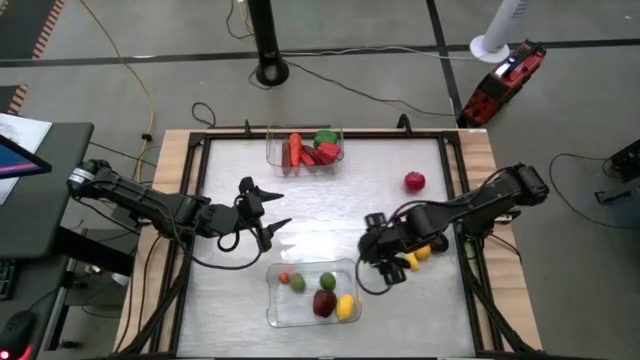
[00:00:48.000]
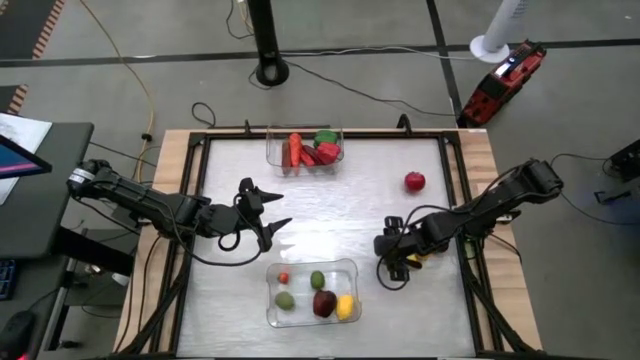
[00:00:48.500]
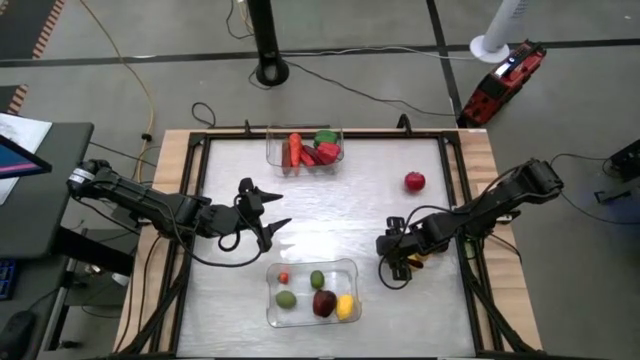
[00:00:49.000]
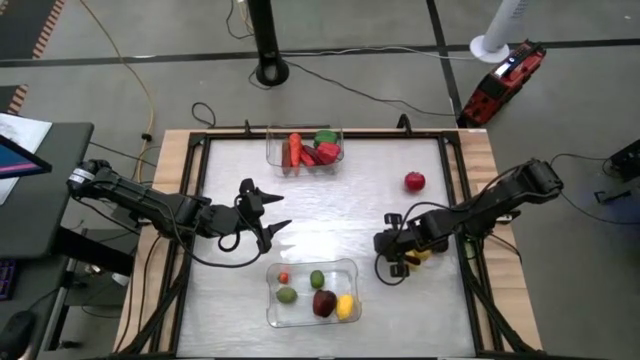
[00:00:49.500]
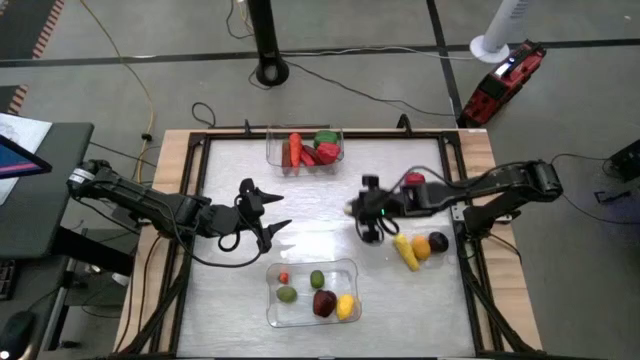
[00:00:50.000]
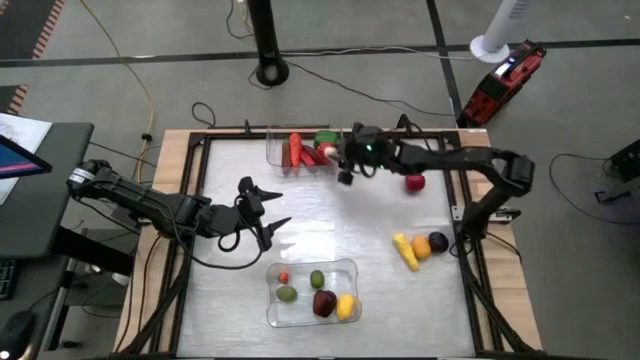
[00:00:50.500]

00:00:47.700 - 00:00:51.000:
Task: Sort produce into baskets
Put the garlic into the top transparent bin

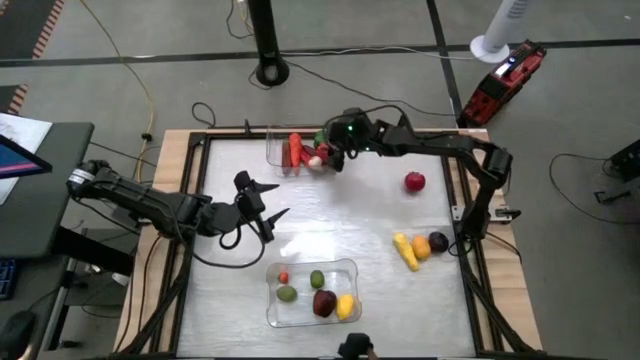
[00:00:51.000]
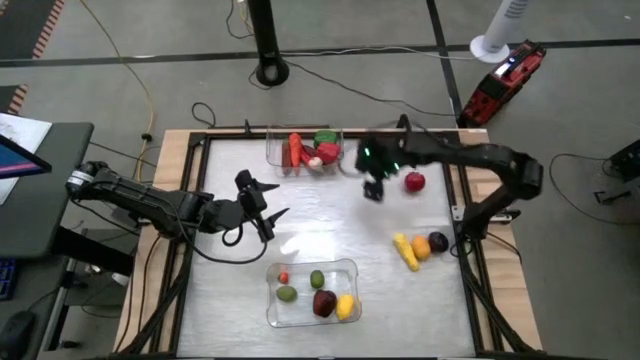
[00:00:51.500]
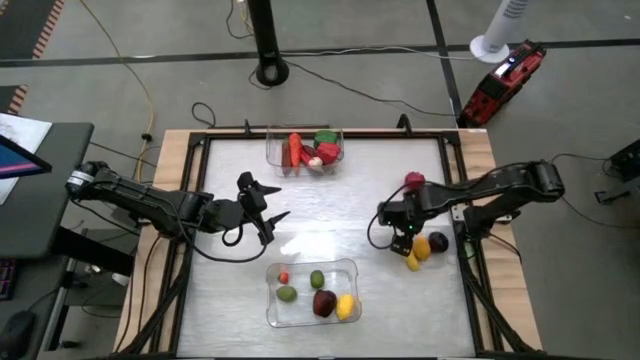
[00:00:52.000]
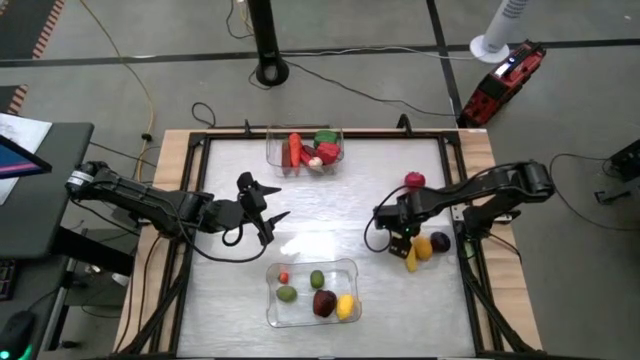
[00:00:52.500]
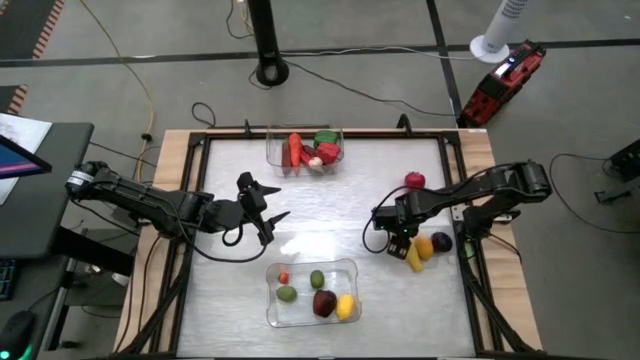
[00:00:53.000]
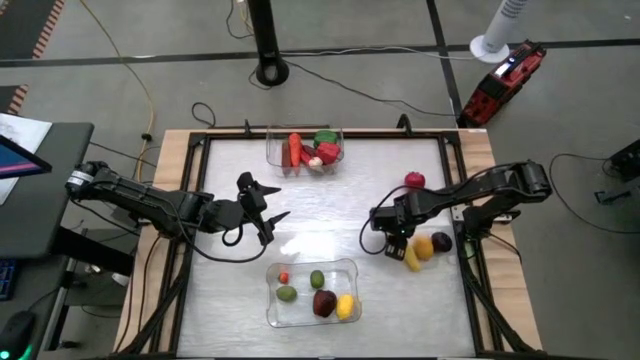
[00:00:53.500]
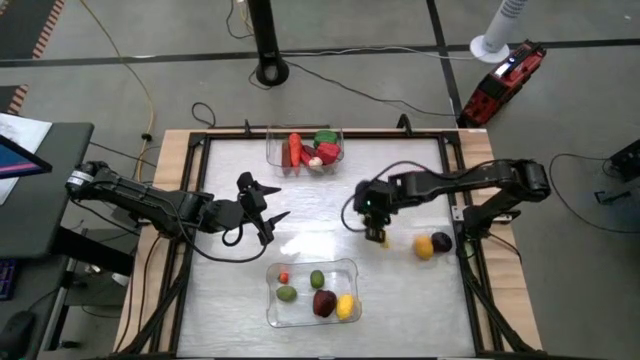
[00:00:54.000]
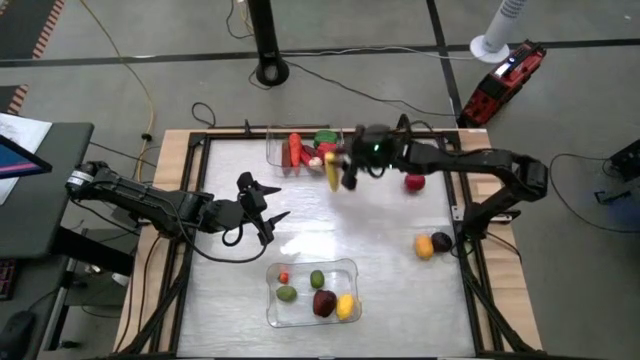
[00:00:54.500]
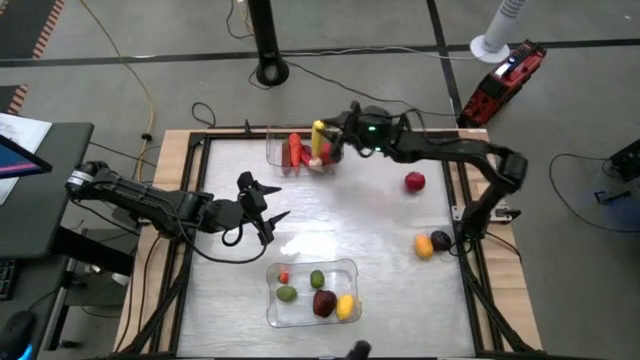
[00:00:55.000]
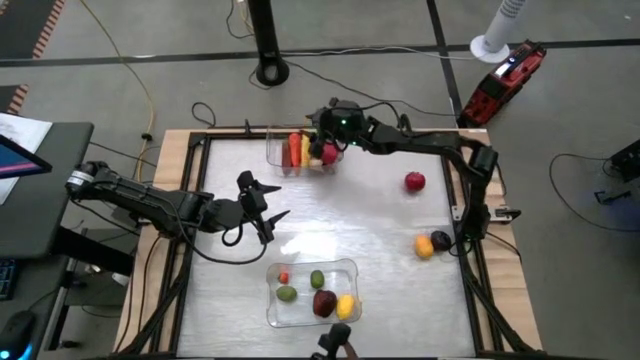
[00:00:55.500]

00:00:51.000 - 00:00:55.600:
Put the corn into the top transparent bin

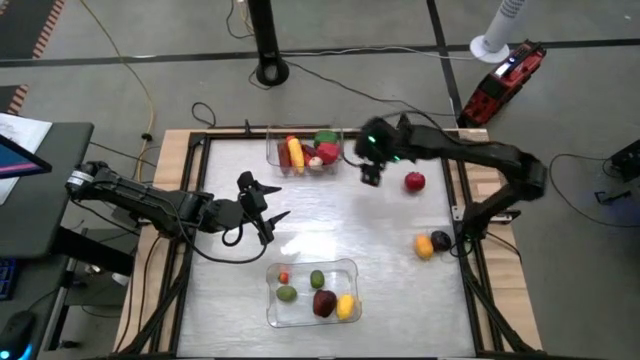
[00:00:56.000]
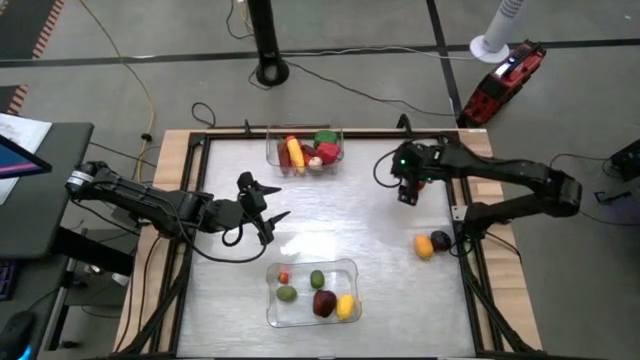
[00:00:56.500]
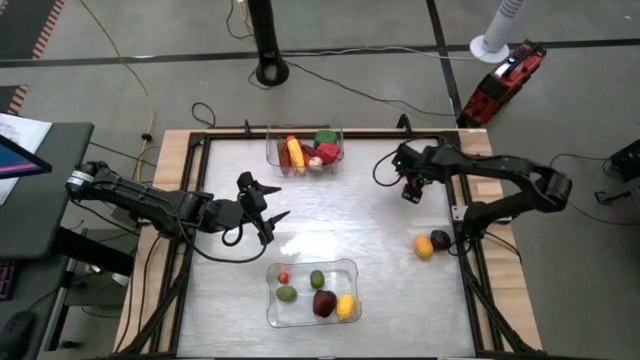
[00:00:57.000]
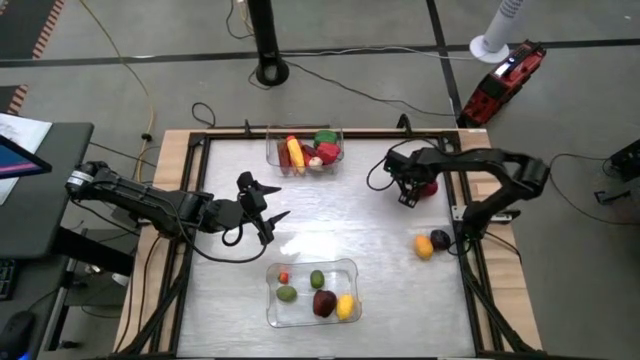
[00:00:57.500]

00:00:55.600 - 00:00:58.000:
Put the tomato into the bottom transparent bin

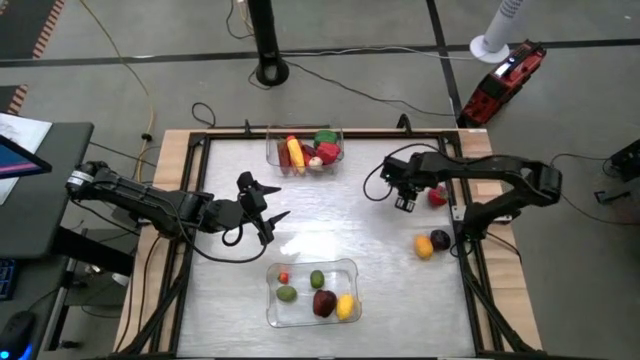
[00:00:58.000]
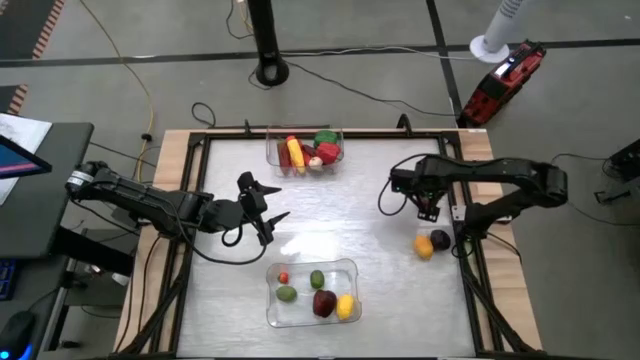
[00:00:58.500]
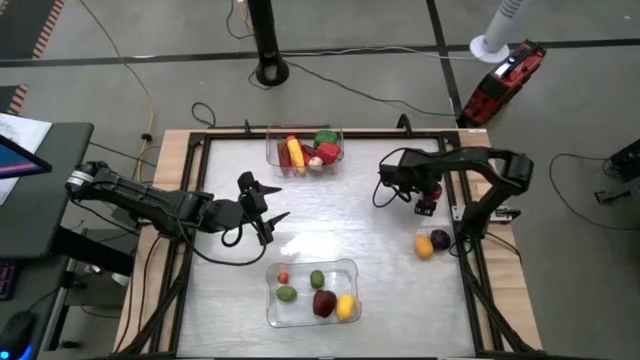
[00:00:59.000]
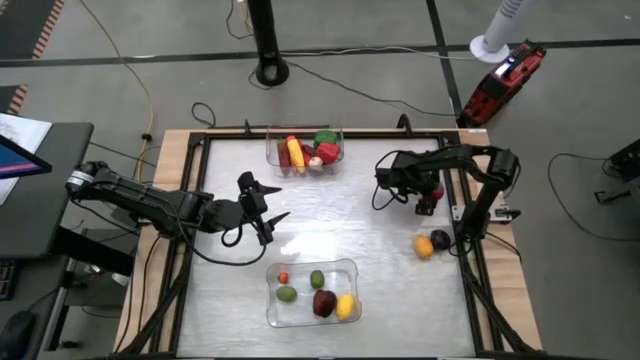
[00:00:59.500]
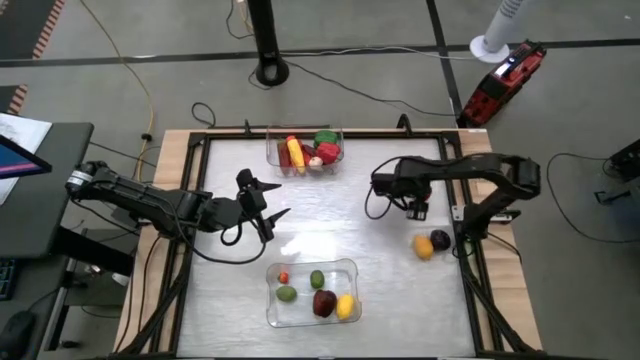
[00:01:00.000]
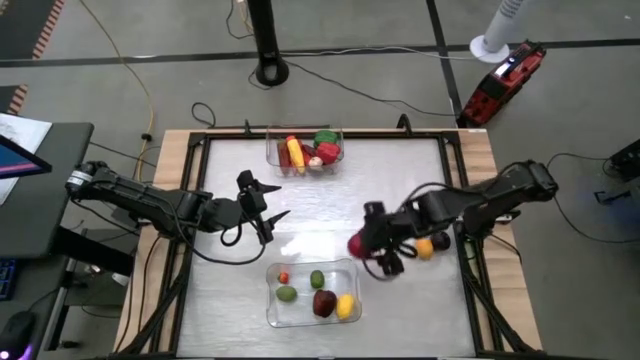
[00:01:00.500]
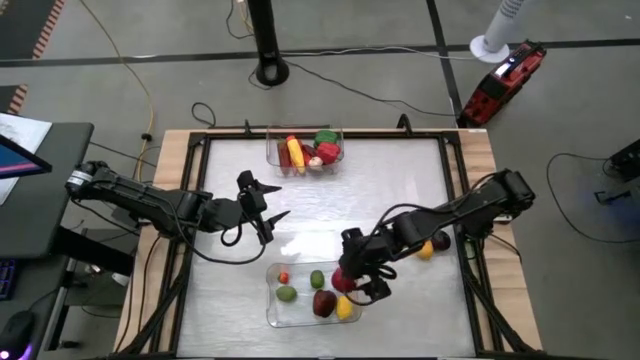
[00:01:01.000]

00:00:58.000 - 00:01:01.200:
Put the tomato into the bottom transparent bin

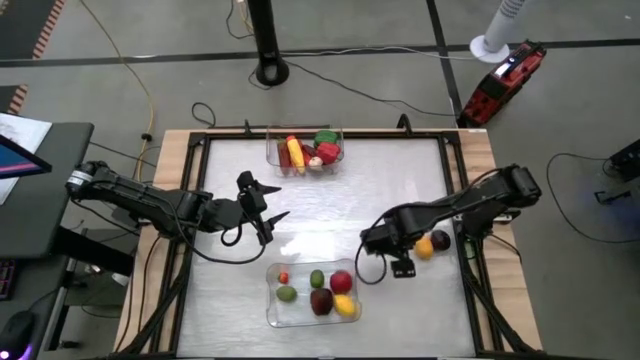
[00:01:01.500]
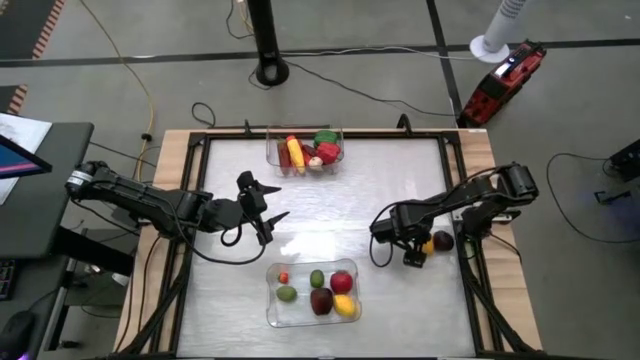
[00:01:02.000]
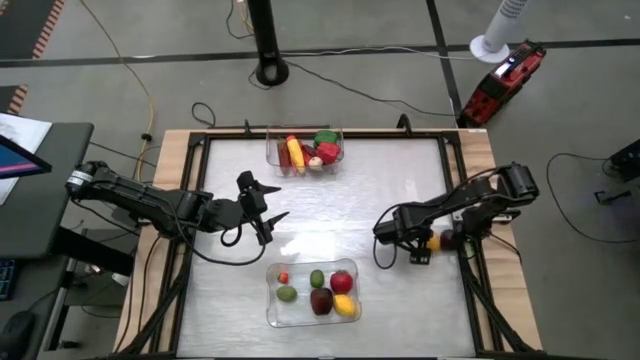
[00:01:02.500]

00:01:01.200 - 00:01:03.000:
Put the lemon into the bottom transparent bin

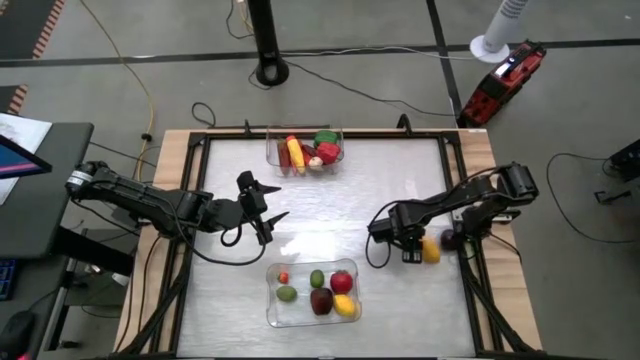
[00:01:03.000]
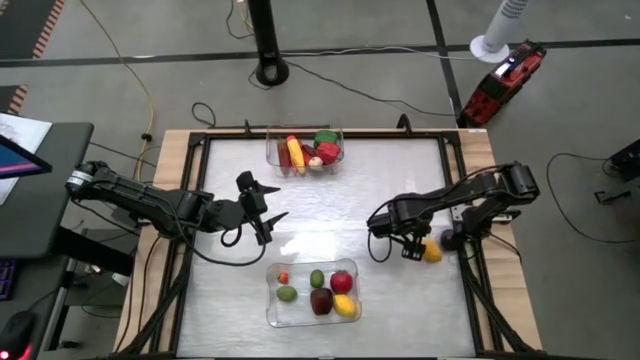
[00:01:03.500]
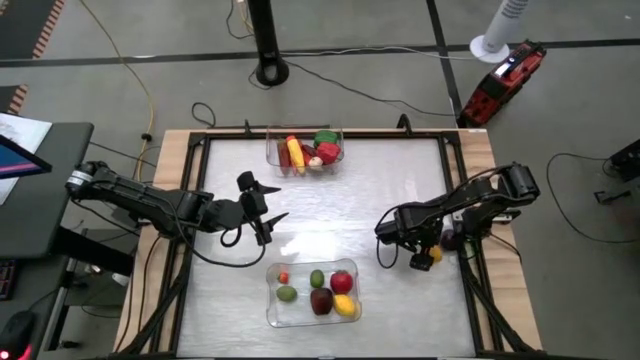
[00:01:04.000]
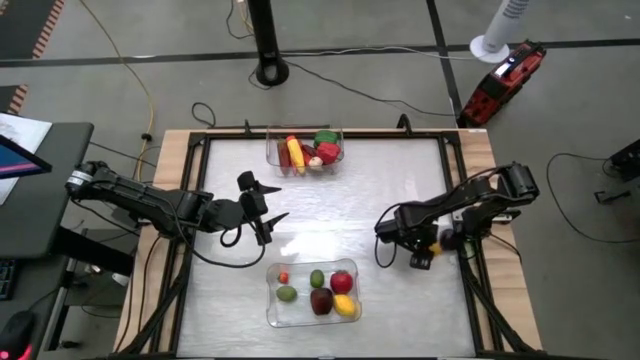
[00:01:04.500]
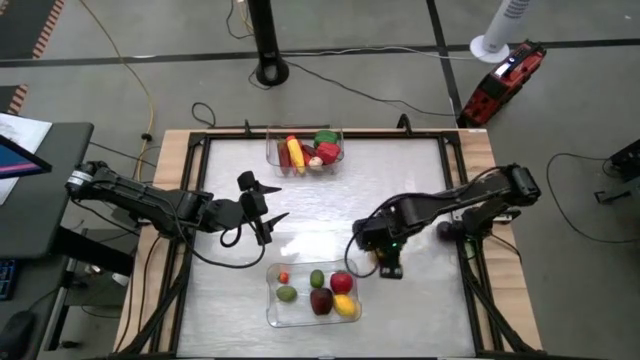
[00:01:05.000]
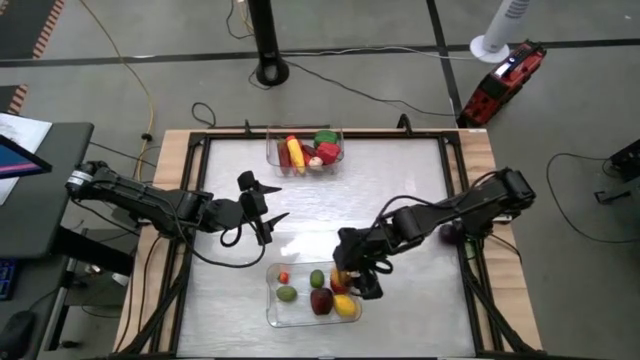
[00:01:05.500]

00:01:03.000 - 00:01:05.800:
Put the lemon into the bottom transparent bin

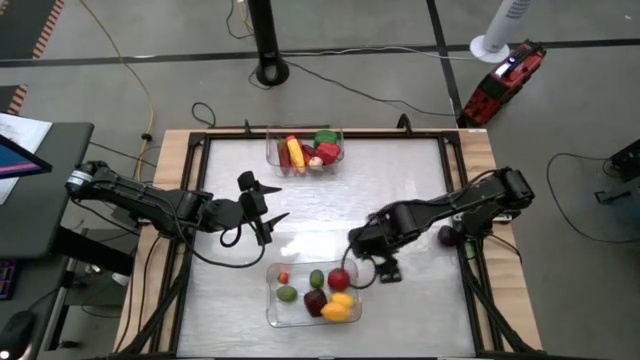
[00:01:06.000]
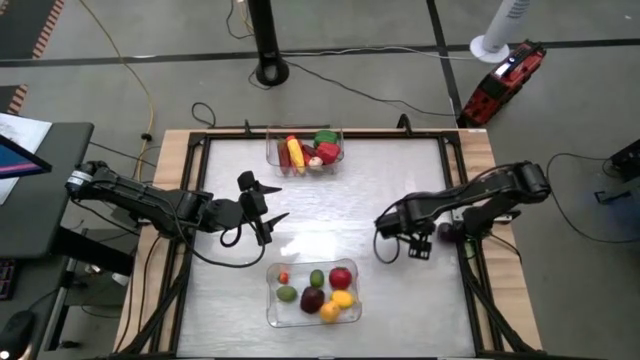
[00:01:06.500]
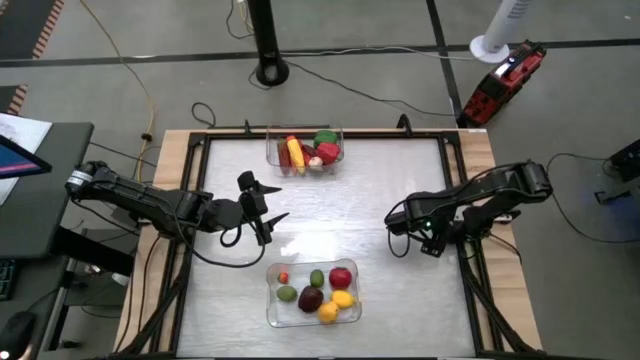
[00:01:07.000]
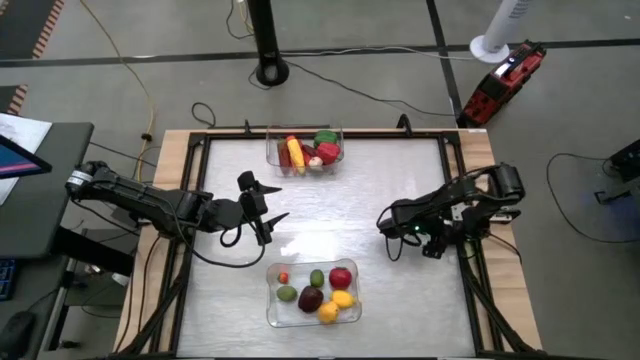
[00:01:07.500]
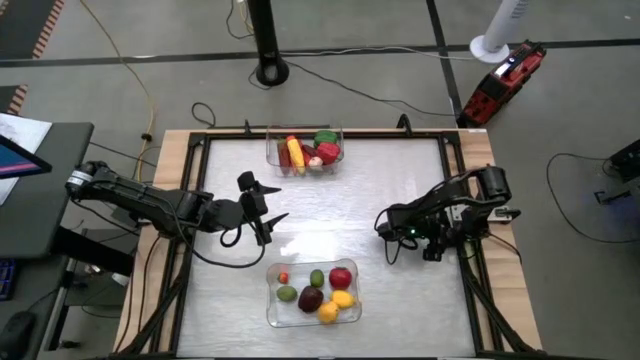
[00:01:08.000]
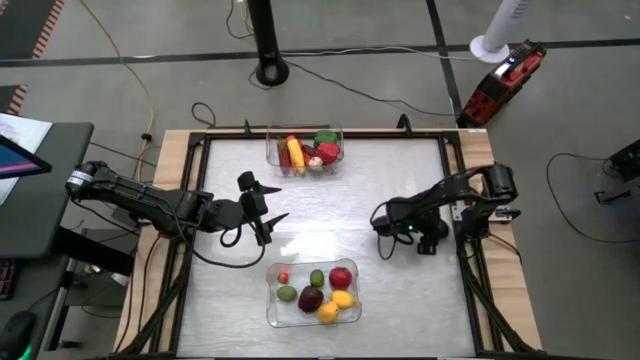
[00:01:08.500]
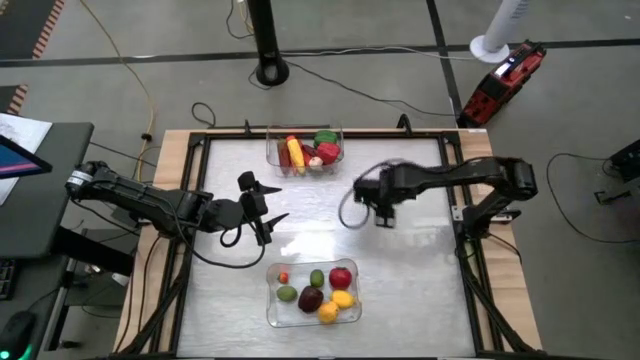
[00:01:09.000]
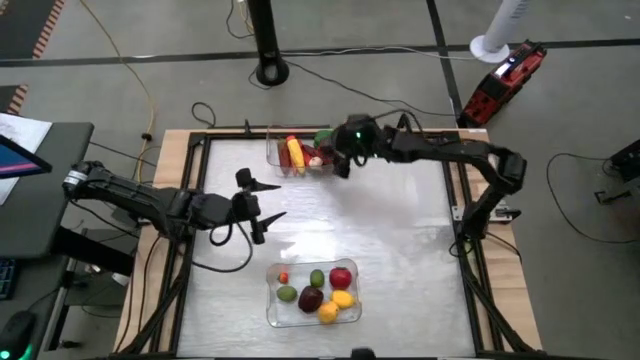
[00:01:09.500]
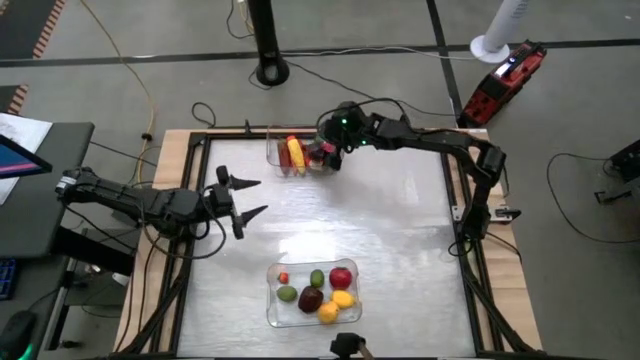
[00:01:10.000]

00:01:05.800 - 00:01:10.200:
Put the onion into the top transparent bin
